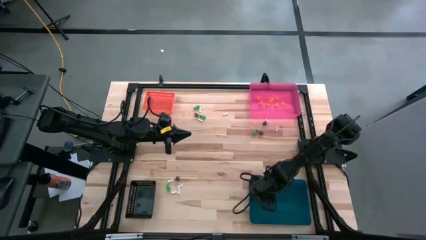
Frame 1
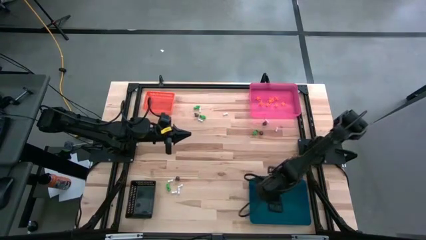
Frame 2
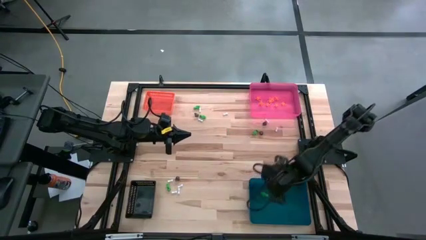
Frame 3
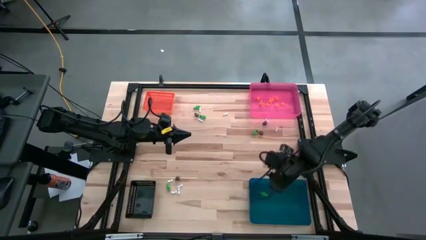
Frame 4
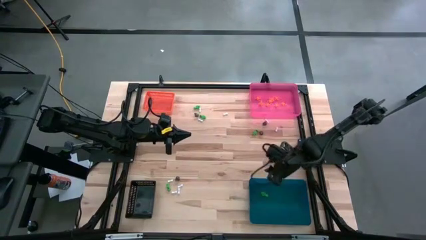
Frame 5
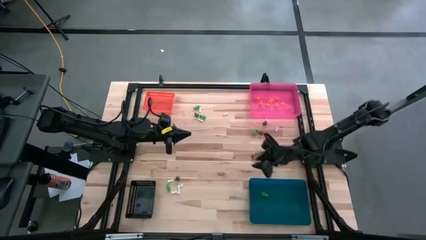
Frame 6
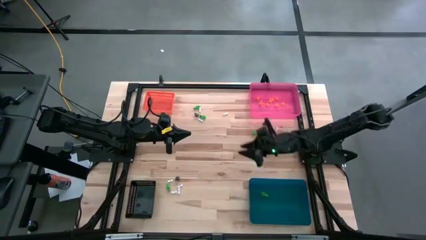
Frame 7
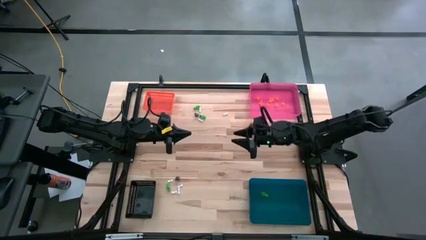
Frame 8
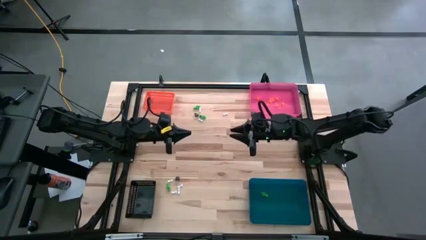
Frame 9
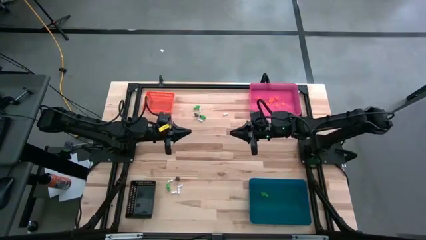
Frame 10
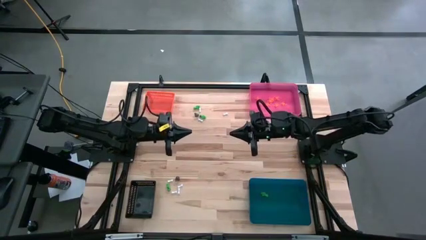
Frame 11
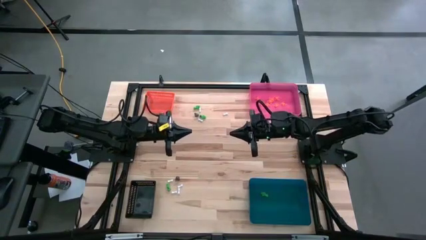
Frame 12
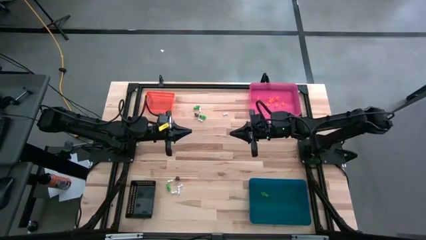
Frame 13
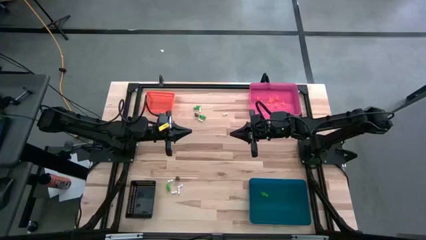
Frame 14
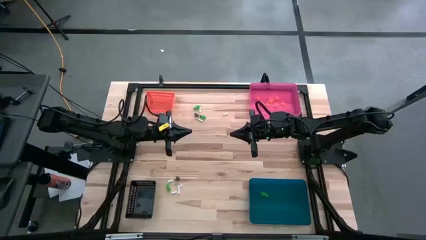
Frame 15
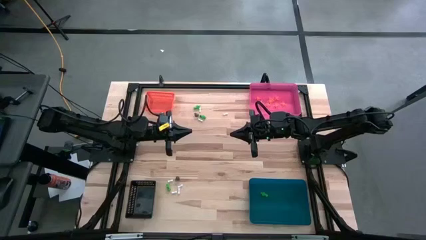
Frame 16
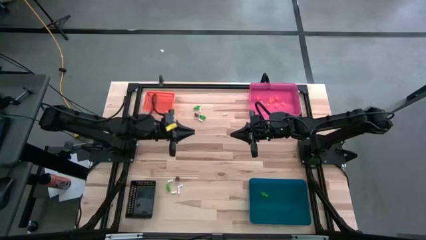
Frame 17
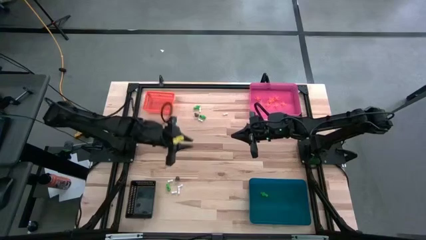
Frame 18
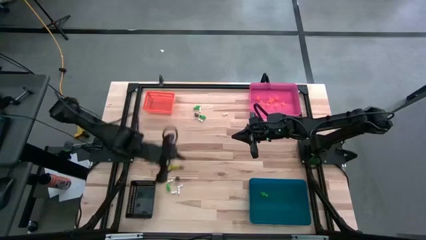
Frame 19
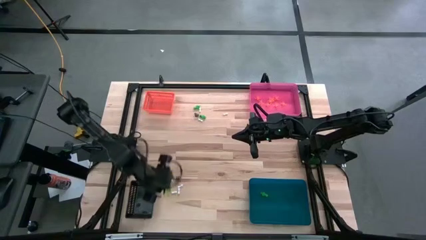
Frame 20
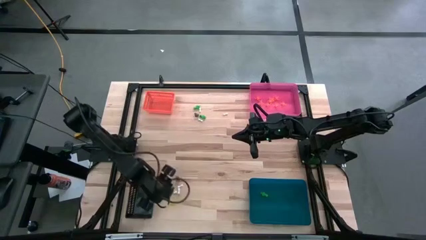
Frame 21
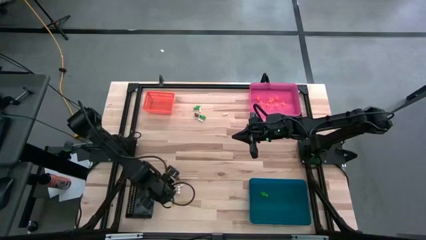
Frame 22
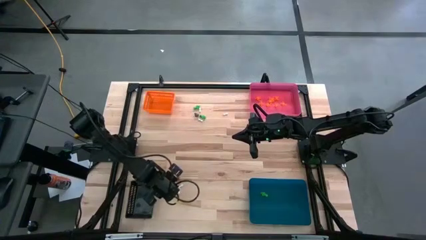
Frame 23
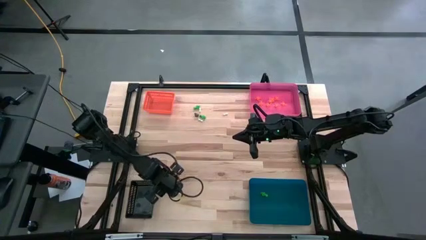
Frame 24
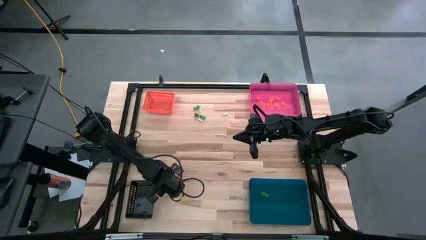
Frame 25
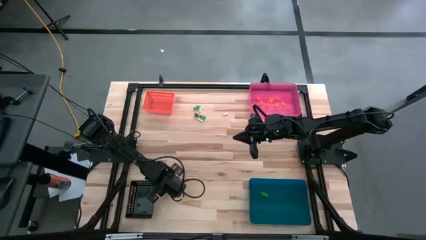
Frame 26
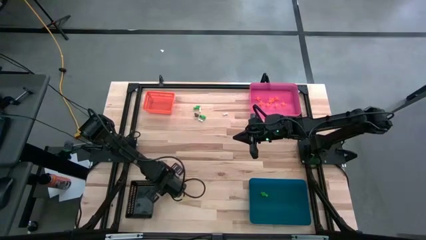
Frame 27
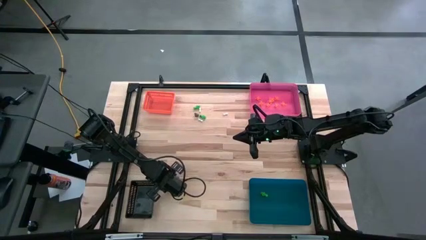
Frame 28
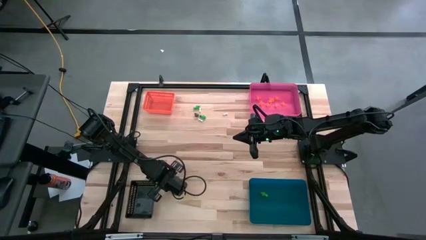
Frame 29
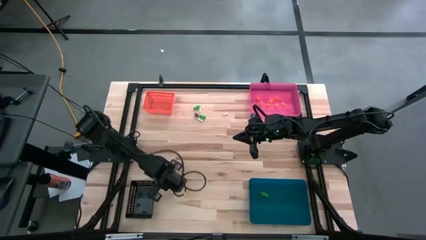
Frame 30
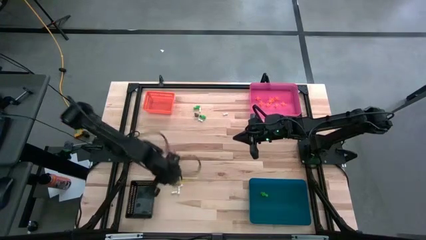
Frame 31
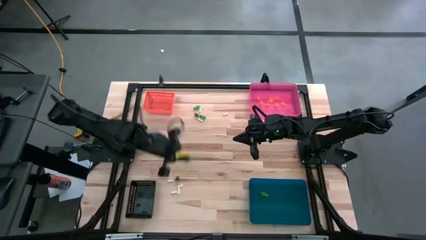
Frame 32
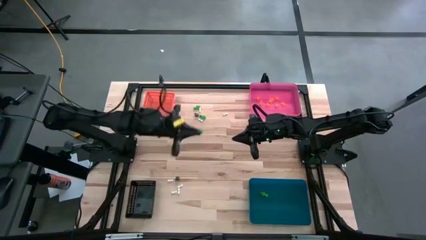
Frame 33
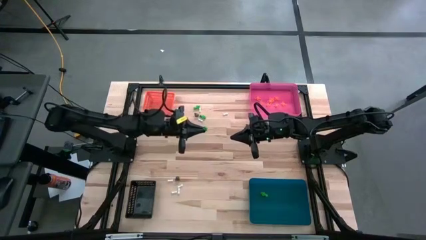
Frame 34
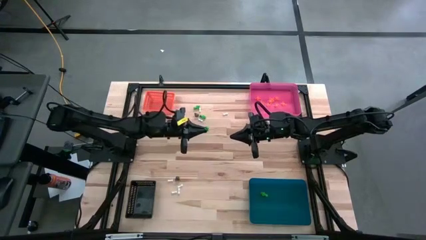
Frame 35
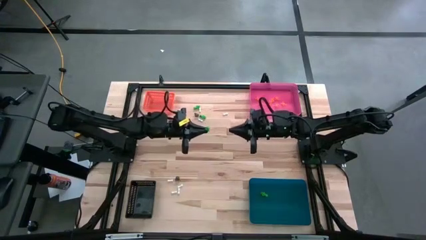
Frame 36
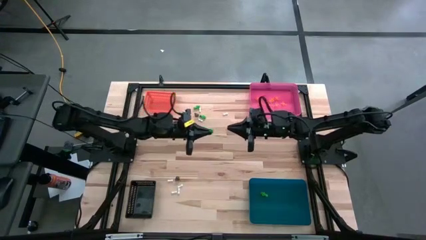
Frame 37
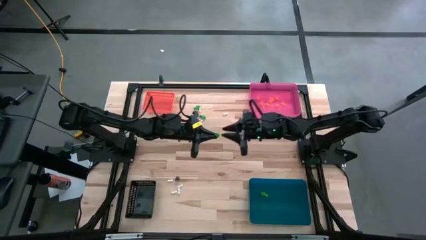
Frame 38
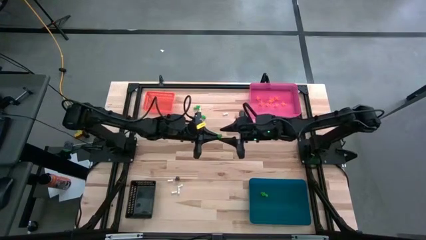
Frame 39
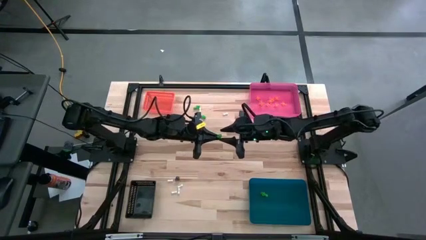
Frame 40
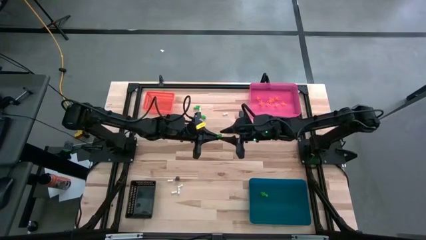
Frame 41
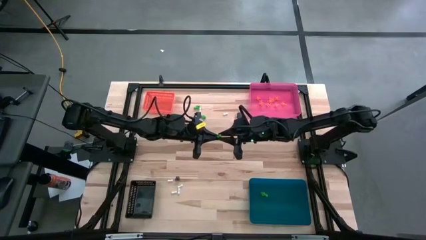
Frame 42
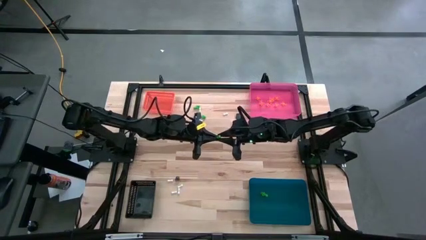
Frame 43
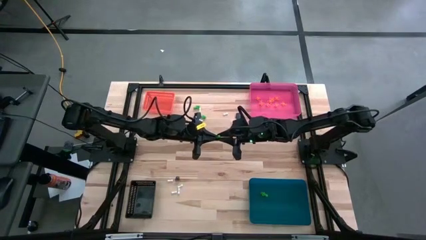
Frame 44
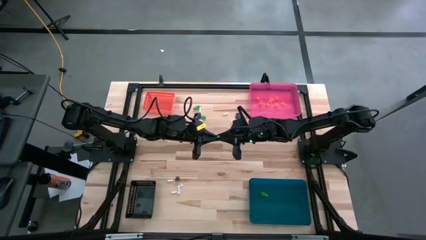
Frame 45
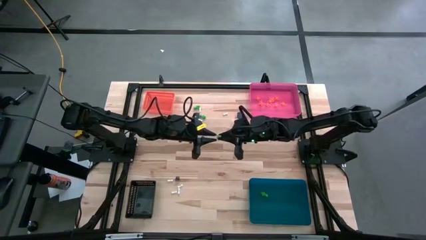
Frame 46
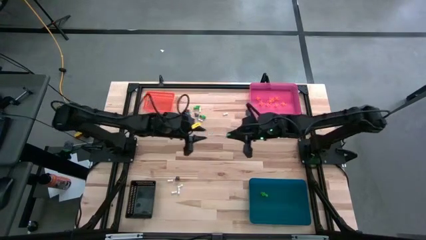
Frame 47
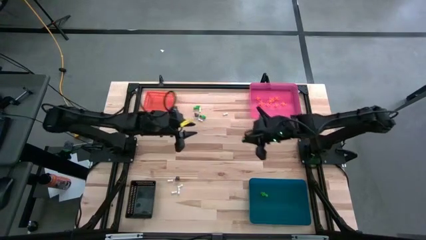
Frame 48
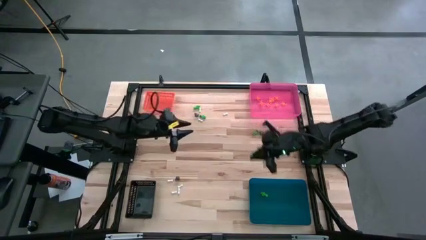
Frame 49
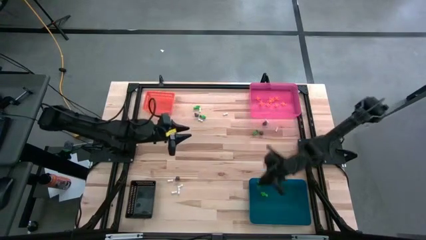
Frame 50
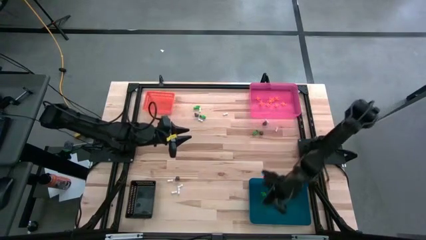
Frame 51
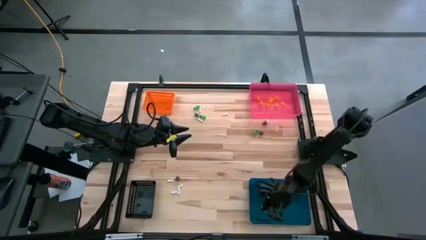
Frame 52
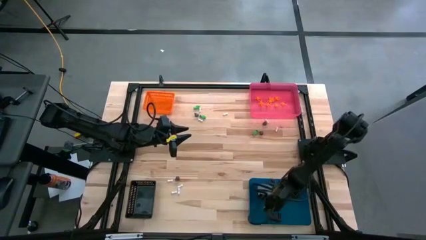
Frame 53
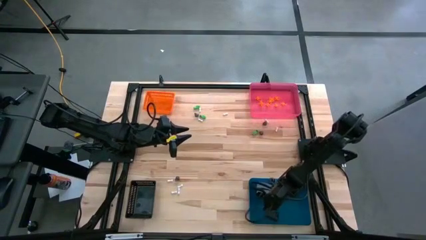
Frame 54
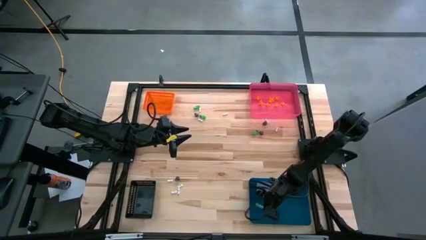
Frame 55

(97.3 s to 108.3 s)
Task: Sort Halloween decoration
Put the green skeleton toy into the blue bin

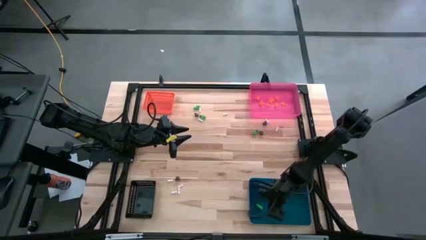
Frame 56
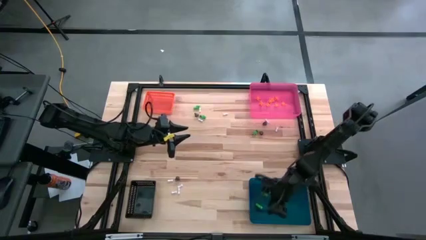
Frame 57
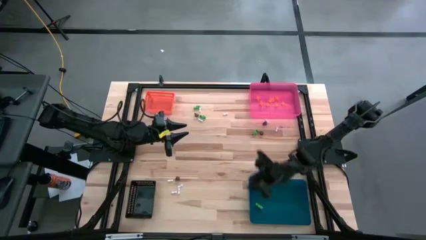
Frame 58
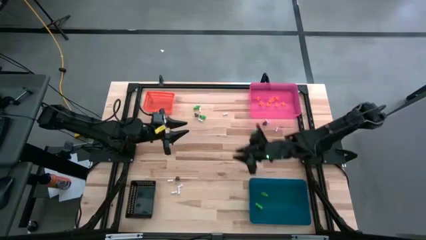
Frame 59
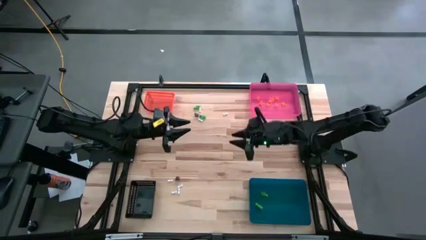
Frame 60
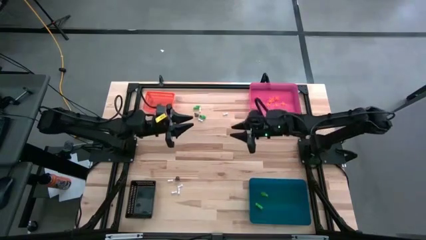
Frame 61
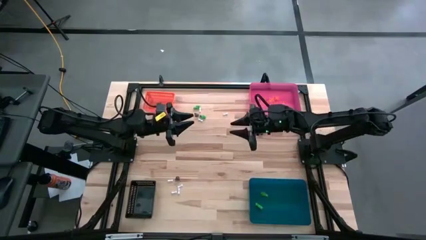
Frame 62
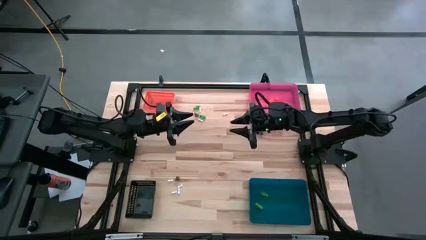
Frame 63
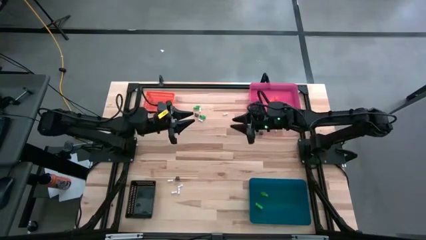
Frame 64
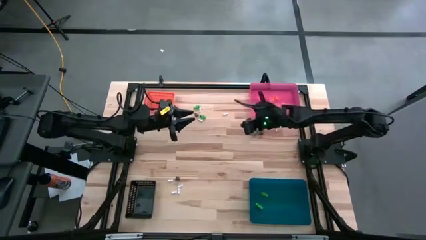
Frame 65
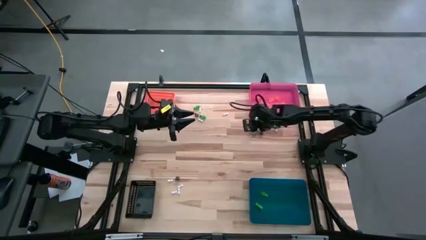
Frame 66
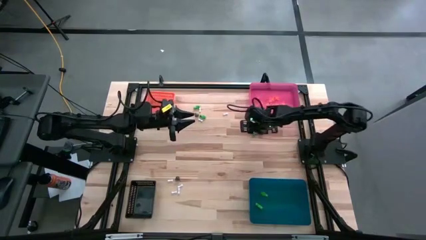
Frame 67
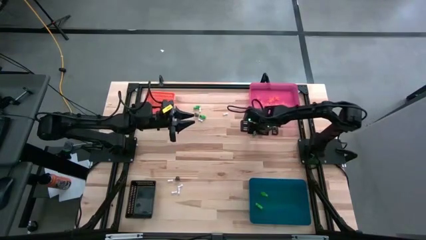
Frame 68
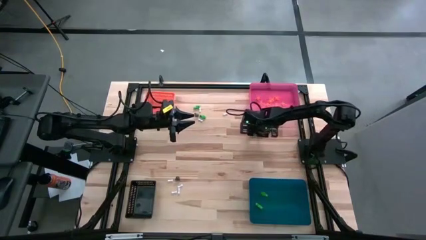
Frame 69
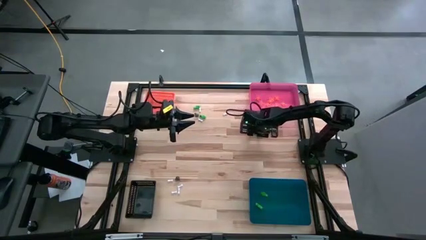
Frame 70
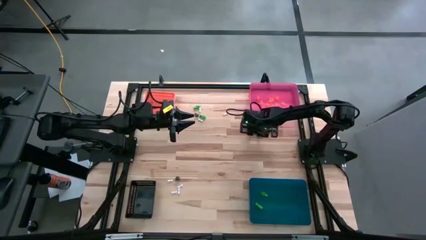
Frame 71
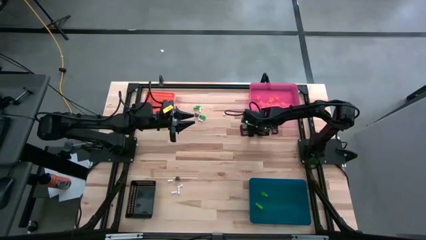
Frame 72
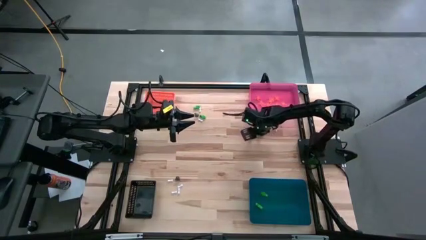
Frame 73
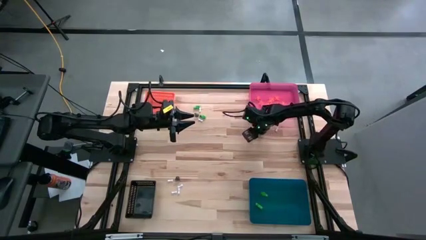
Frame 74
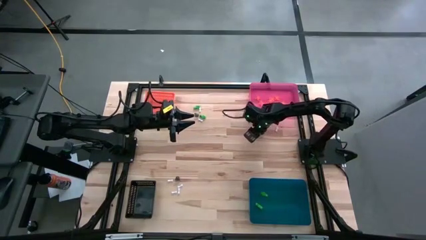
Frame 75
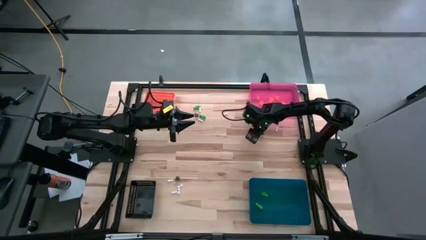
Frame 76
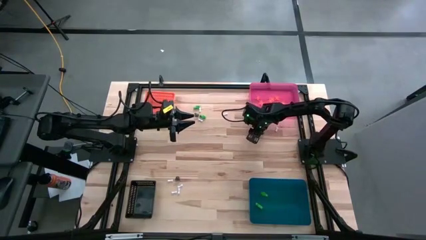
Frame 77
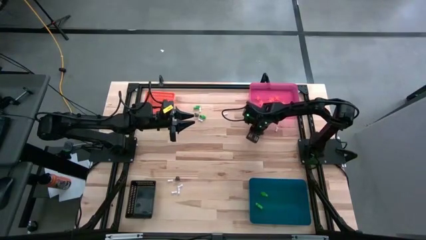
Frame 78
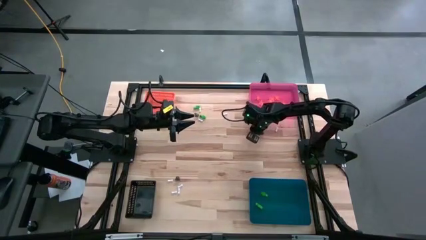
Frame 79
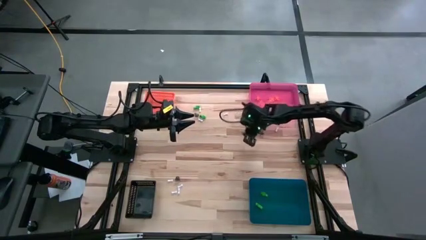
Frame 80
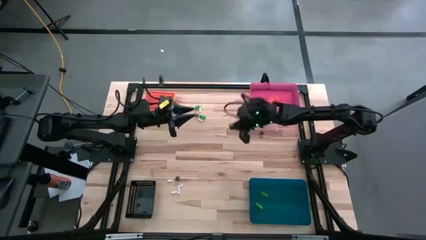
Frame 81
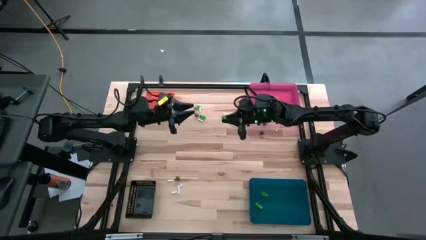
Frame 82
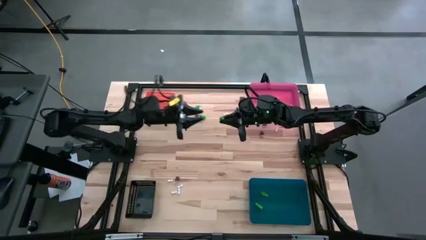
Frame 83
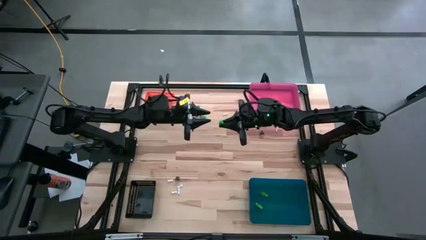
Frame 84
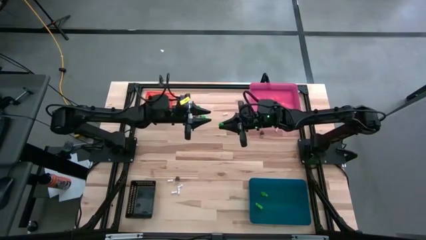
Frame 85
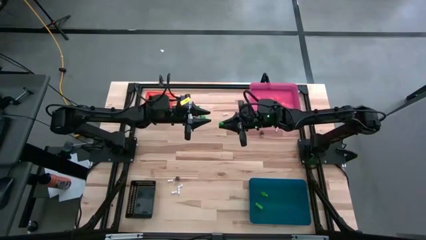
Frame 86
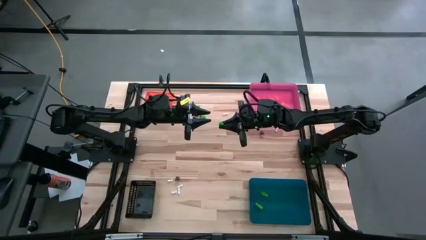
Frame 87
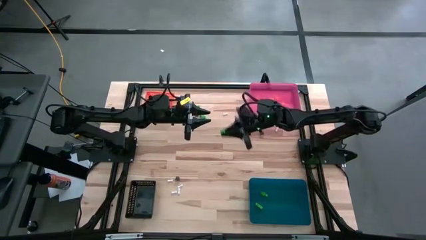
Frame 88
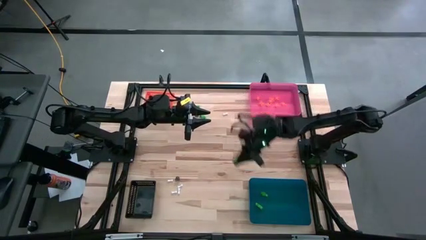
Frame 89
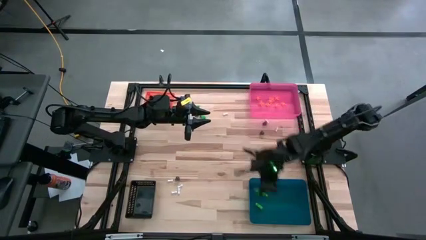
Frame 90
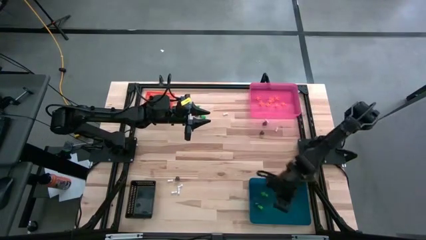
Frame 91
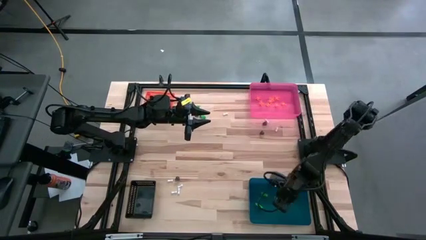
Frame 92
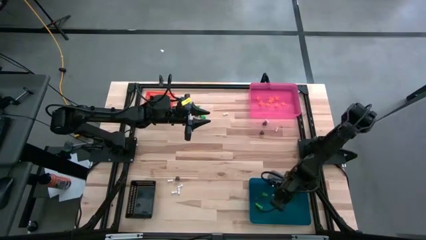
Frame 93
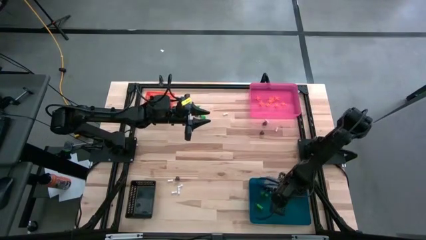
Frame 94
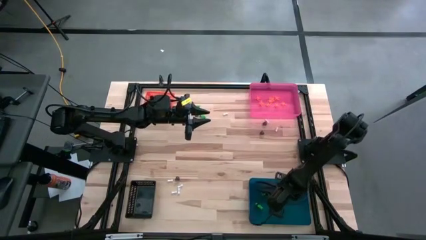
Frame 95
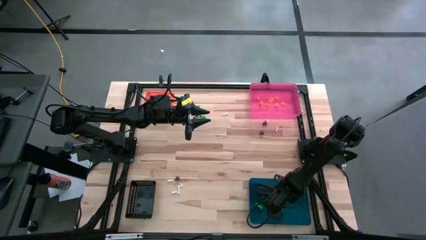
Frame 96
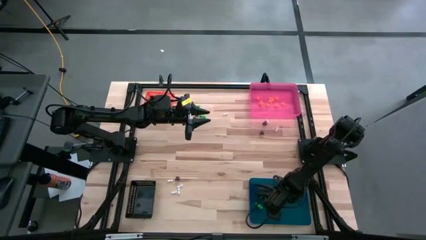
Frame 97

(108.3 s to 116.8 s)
Put the bottom right green skeleton toy into the blue bin
